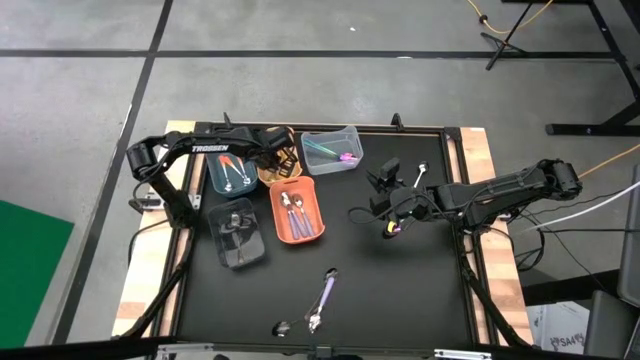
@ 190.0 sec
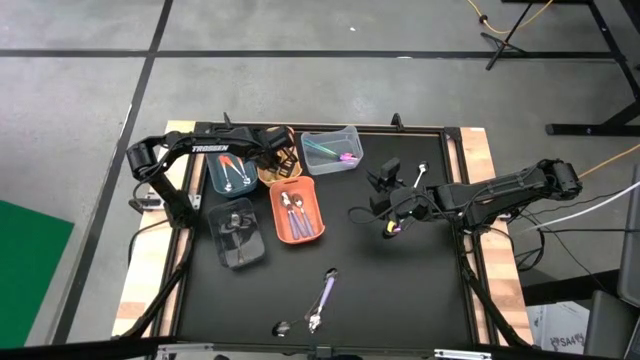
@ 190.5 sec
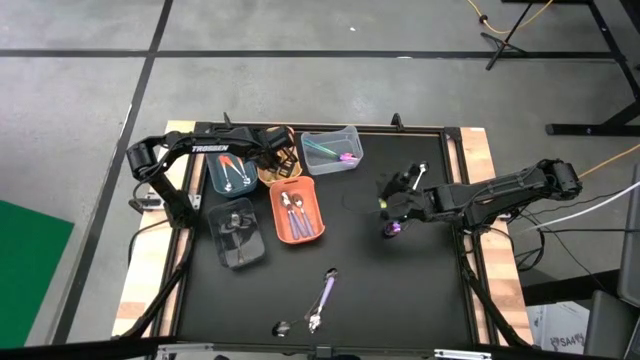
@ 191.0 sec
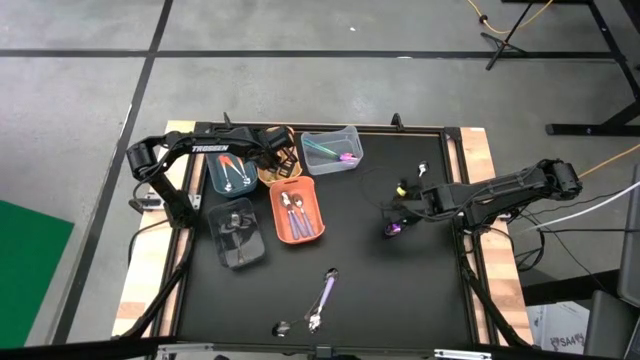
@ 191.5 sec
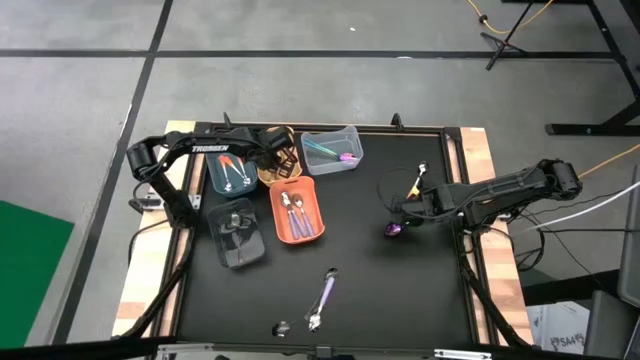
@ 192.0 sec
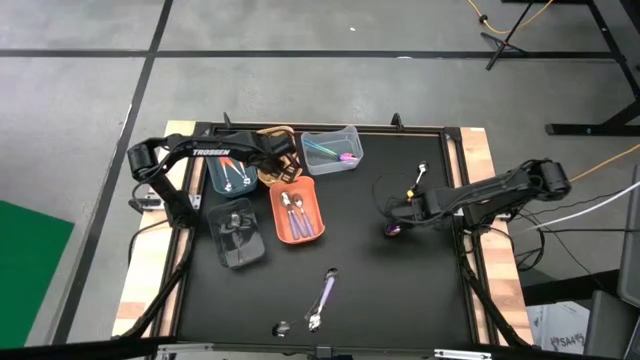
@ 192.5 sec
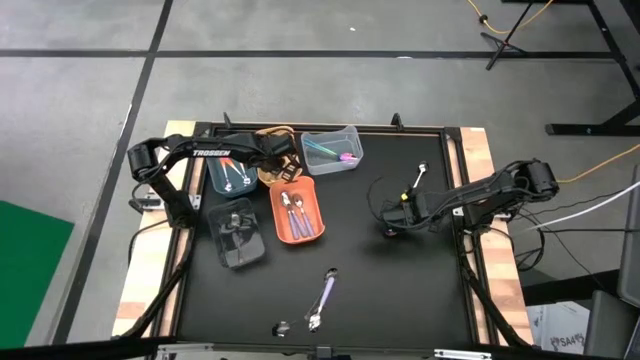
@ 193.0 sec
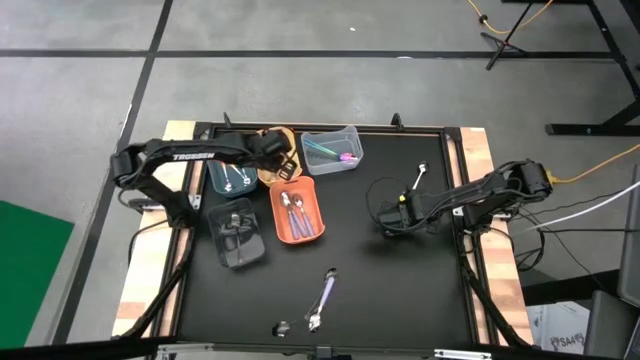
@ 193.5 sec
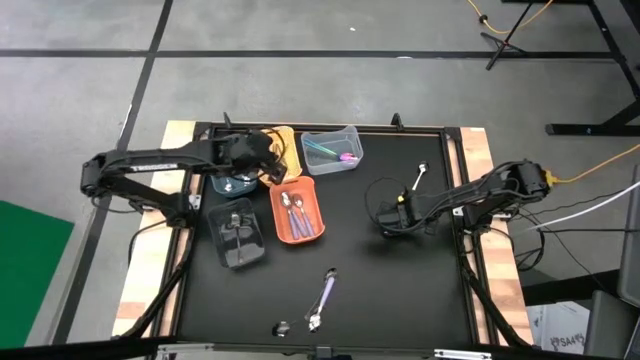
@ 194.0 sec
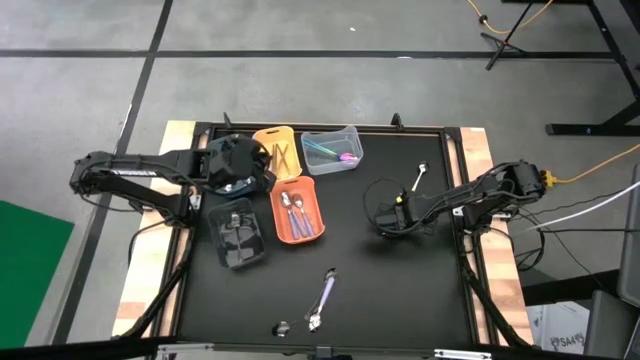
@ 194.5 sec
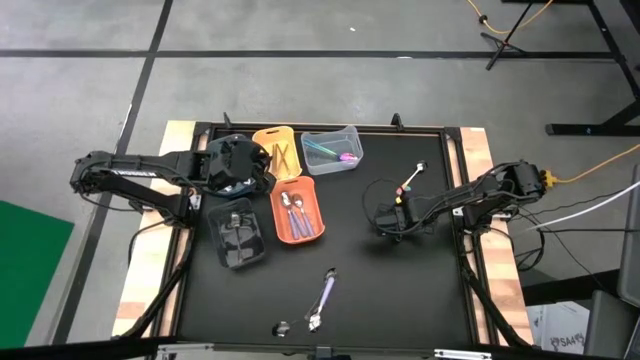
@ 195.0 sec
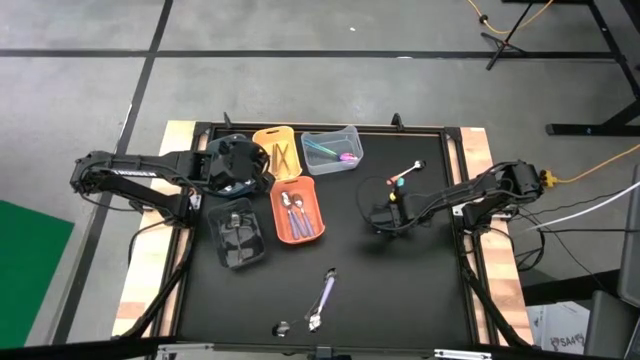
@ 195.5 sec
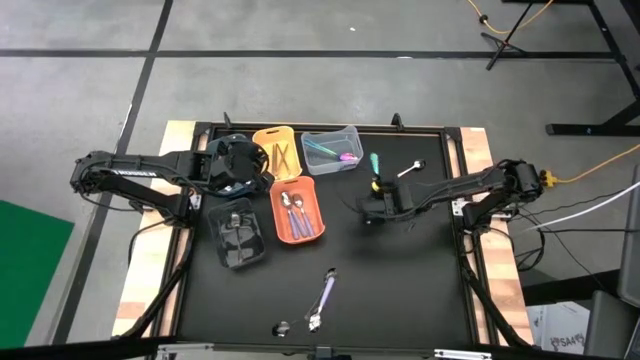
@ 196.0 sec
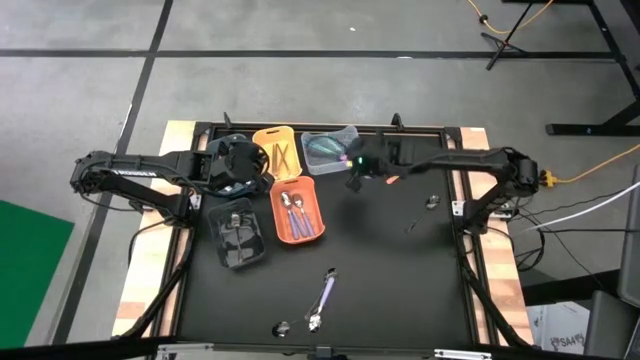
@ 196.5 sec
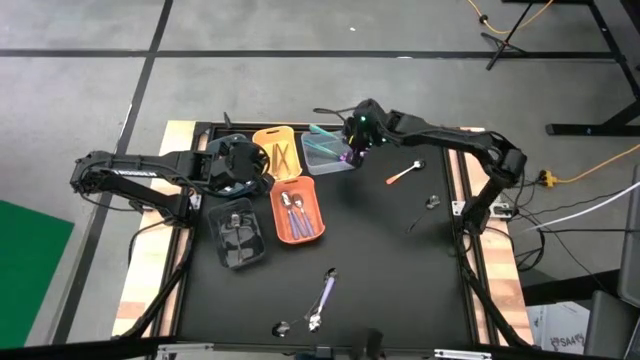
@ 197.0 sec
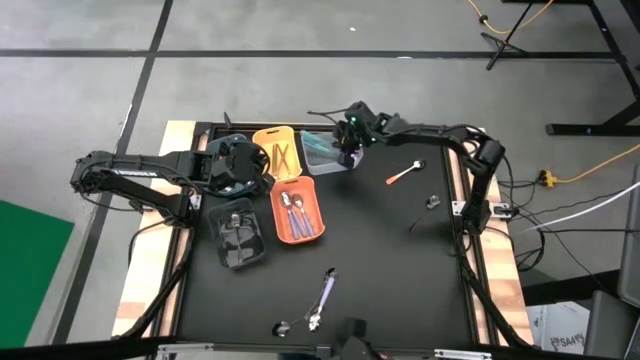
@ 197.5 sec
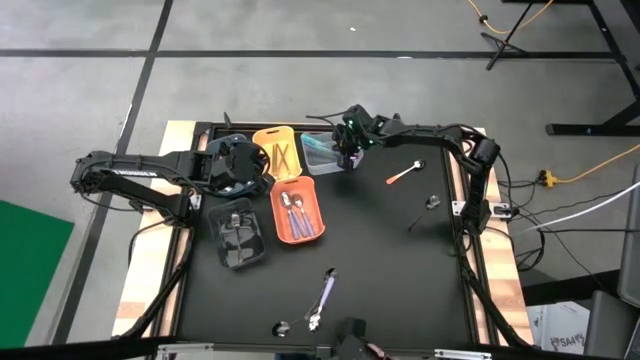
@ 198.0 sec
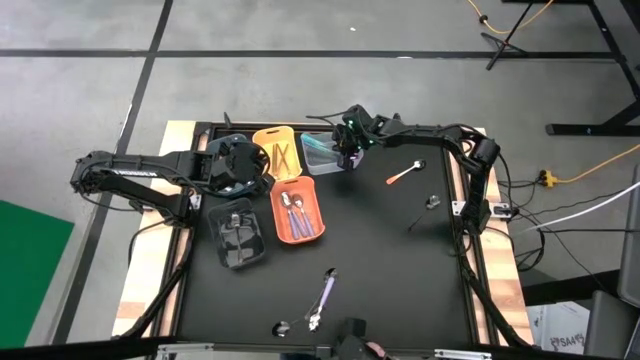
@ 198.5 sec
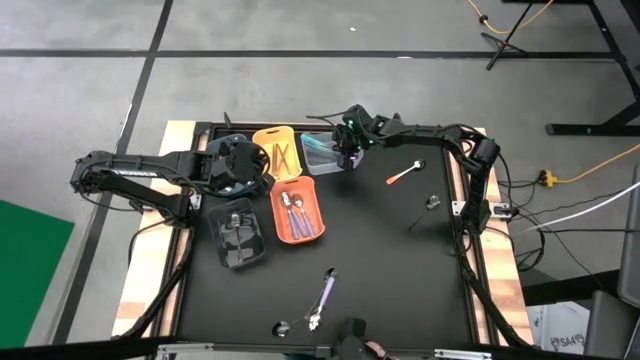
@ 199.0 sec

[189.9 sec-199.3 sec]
Task: Sort silverware by color (type)
Put the blue spoon into the transparent bin

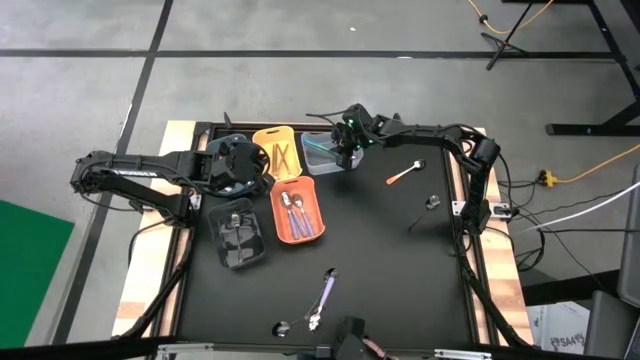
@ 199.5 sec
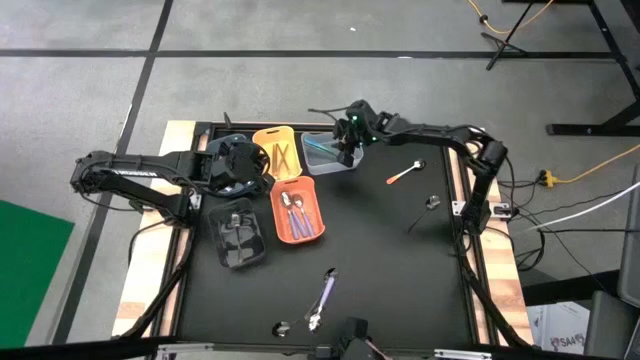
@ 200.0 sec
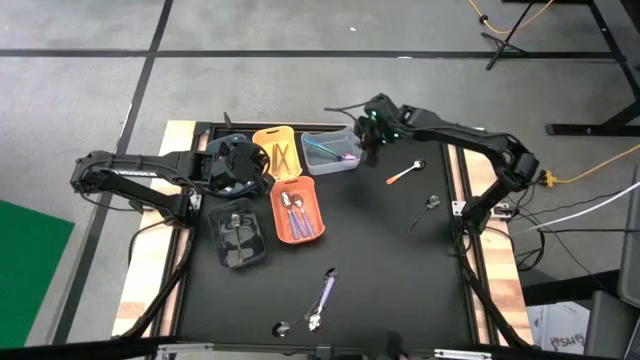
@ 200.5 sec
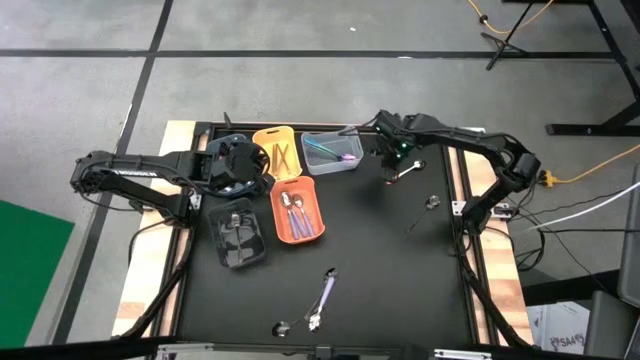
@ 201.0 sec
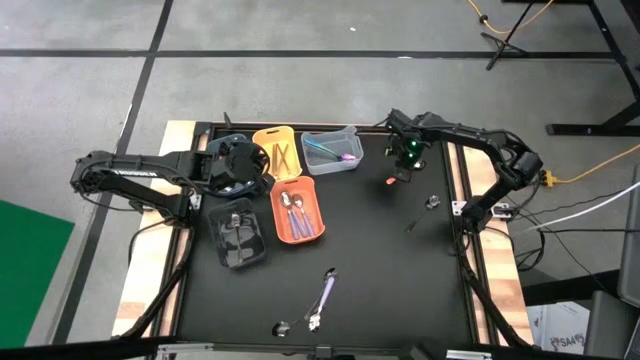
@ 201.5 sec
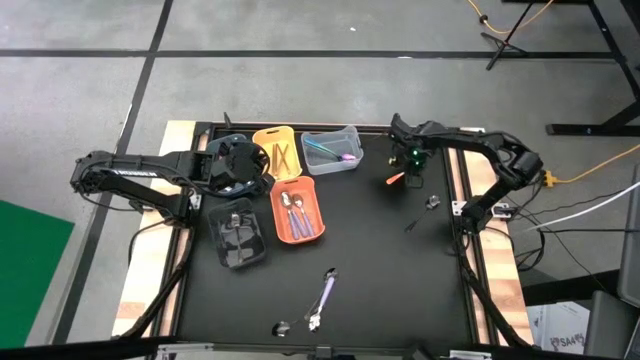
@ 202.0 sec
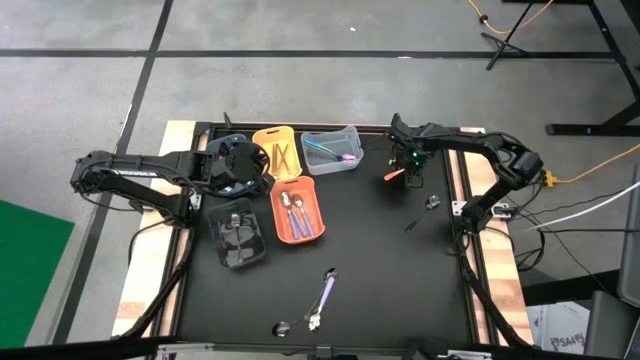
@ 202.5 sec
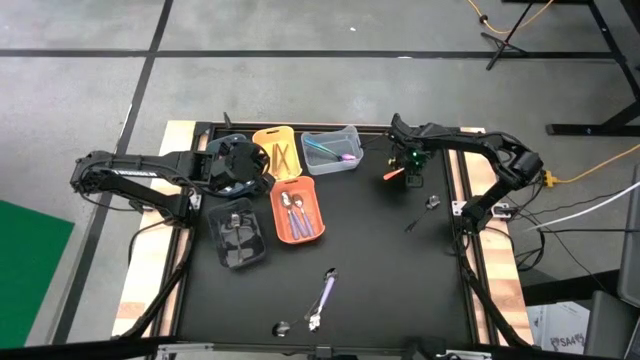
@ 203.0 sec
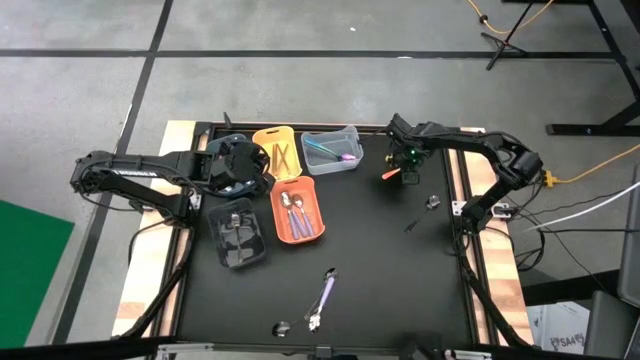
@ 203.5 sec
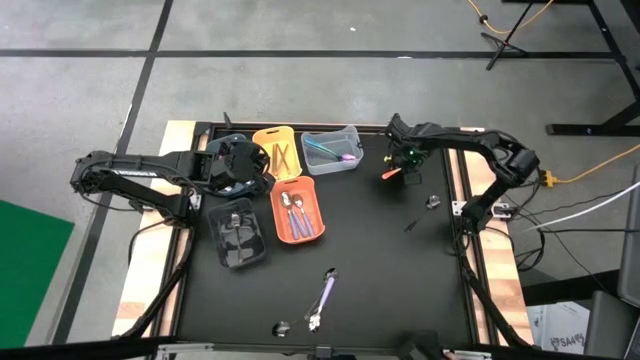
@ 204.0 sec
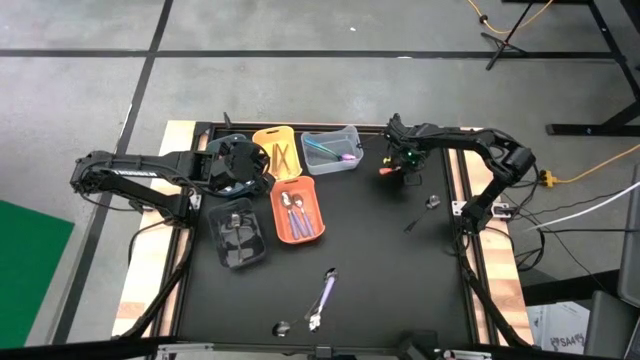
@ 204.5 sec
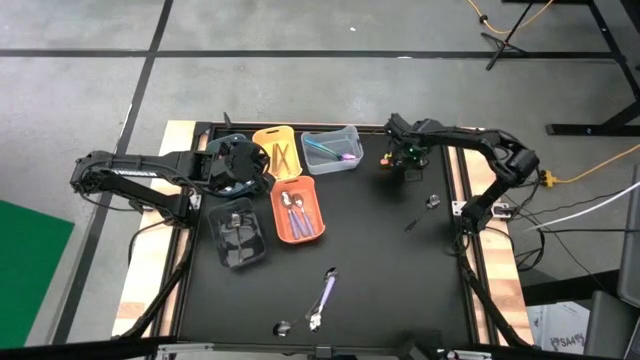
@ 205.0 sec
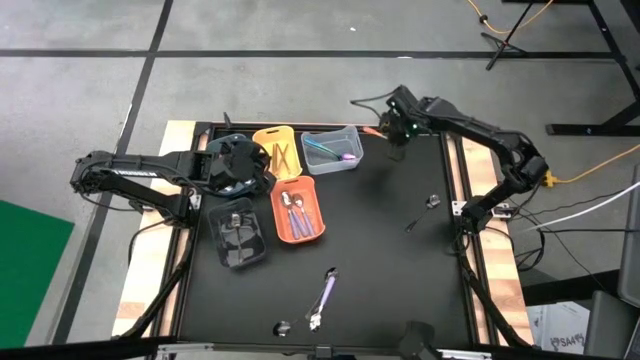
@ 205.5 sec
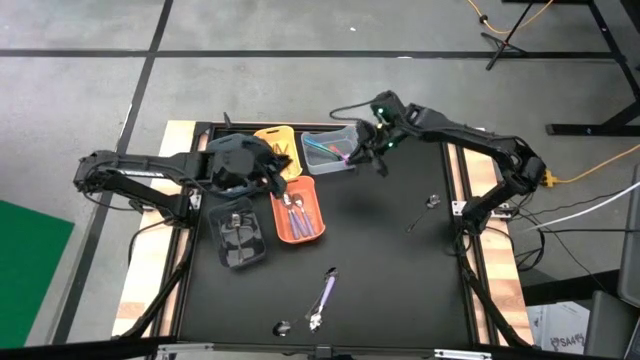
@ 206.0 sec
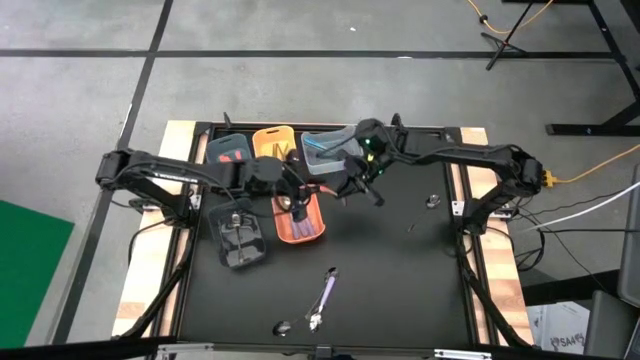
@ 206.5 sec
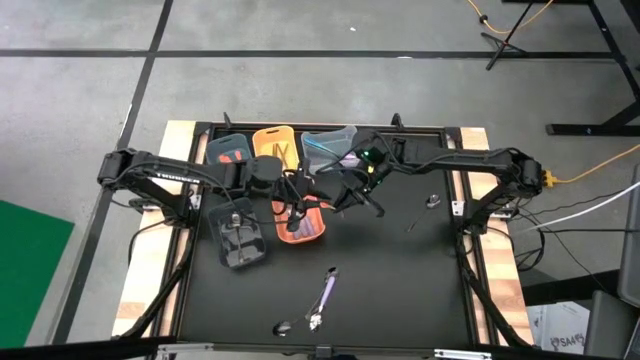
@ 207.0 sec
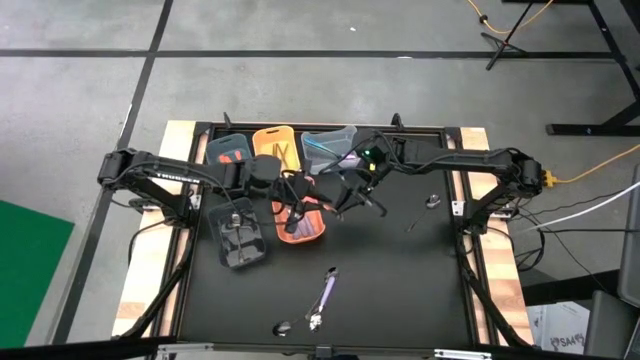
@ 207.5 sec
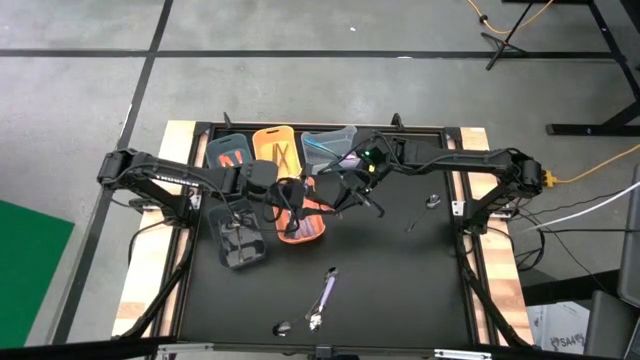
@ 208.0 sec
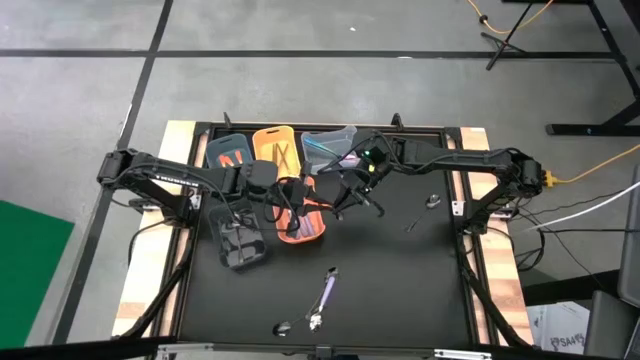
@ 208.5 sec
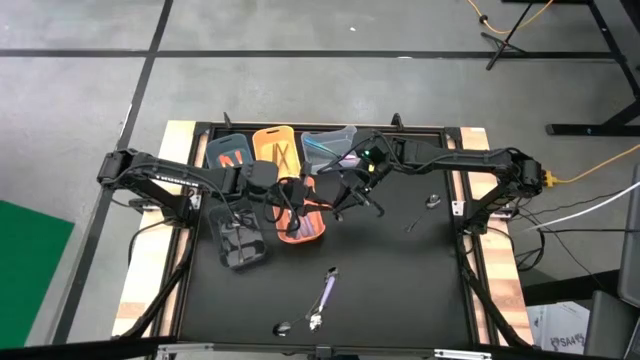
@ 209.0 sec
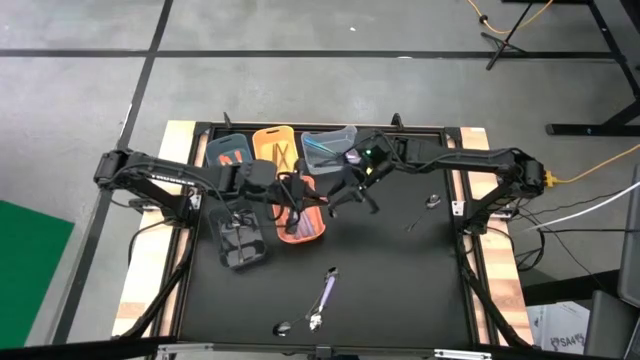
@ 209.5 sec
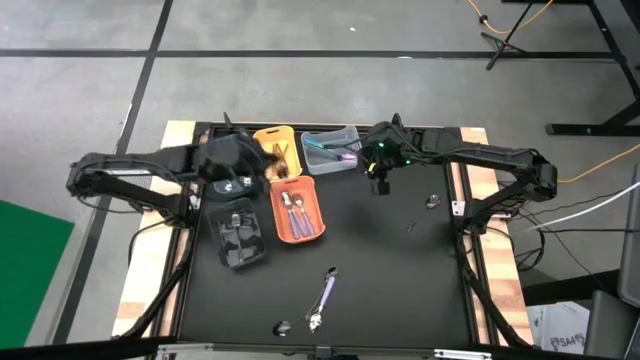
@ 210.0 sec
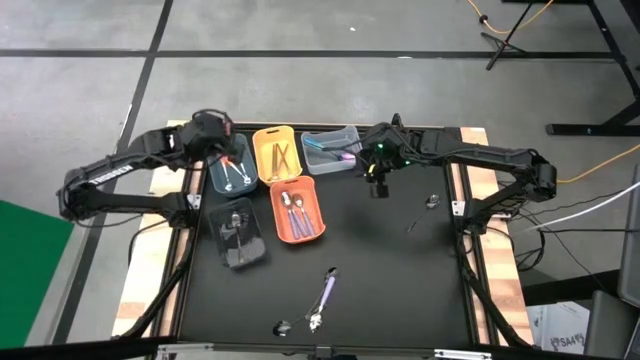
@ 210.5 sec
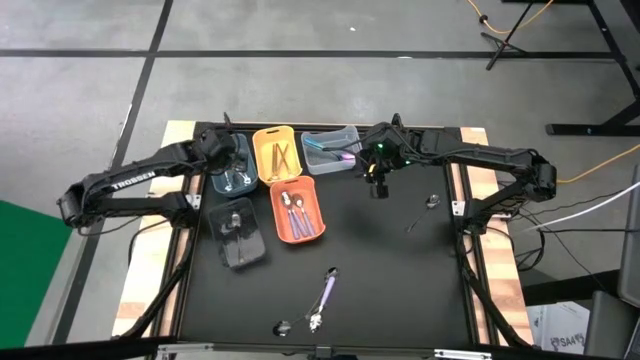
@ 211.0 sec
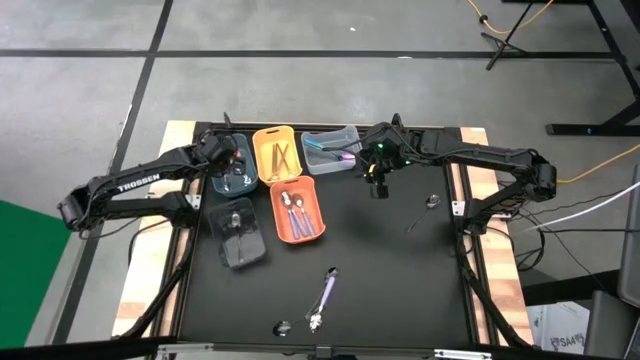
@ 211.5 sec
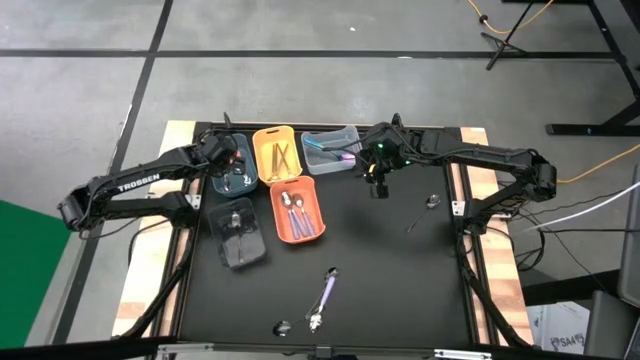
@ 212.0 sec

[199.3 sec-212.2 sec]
Put the orange spoon into the blue bin
